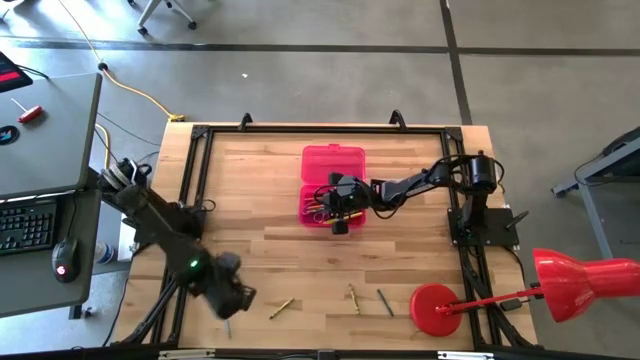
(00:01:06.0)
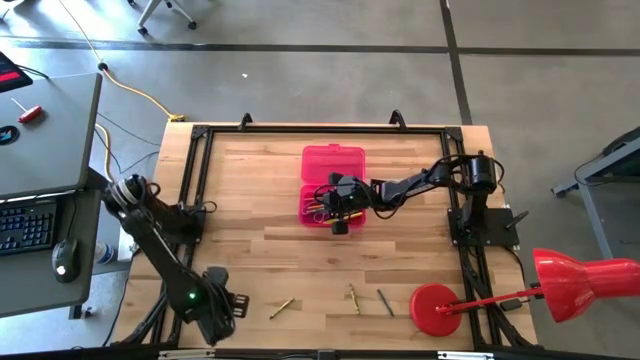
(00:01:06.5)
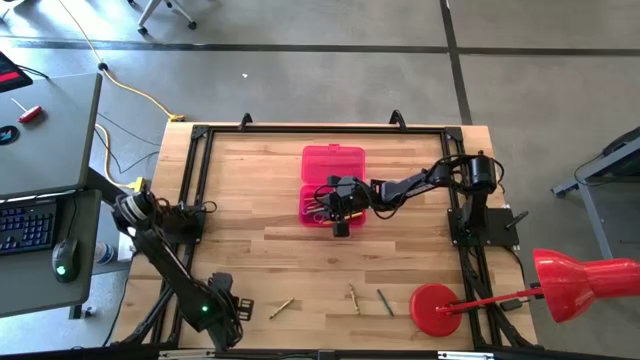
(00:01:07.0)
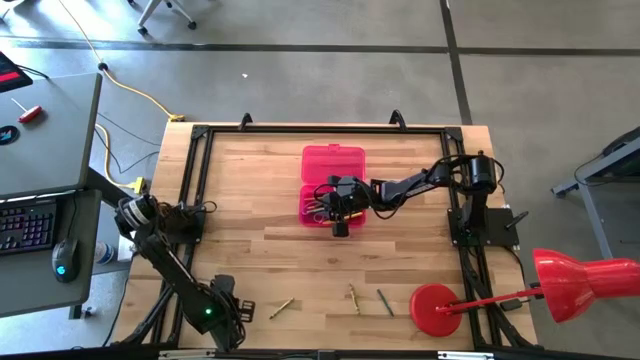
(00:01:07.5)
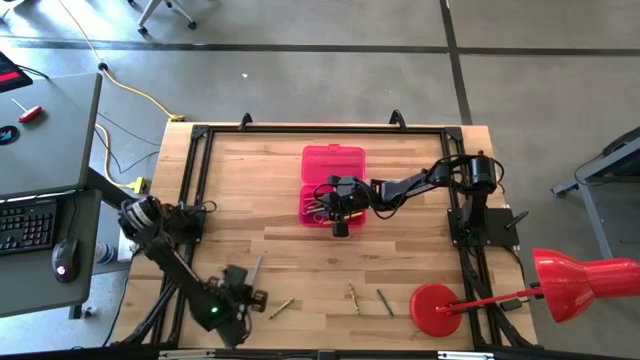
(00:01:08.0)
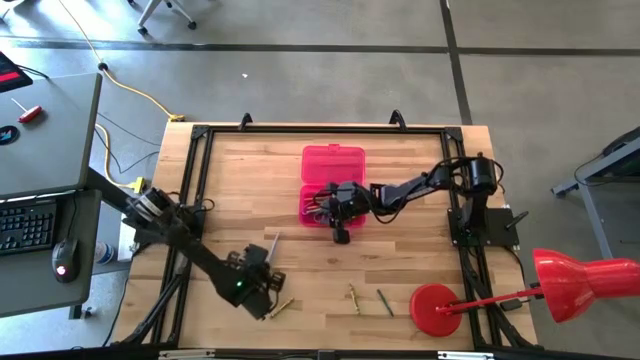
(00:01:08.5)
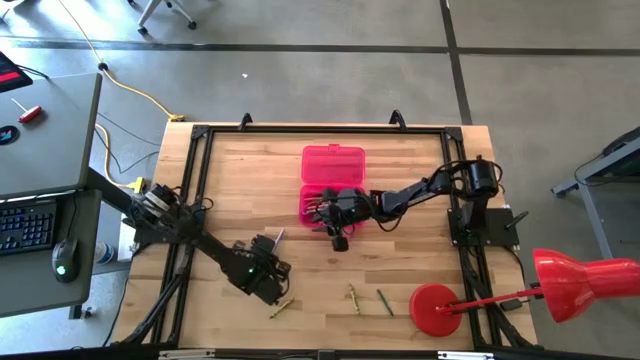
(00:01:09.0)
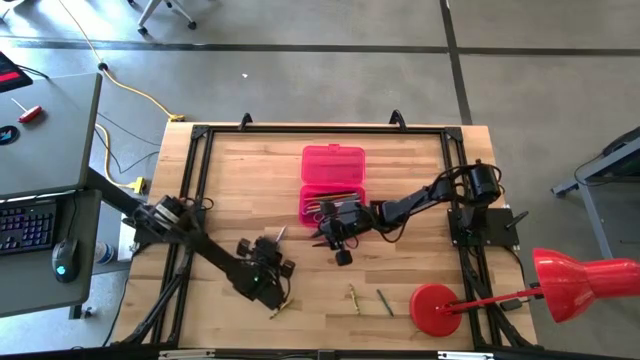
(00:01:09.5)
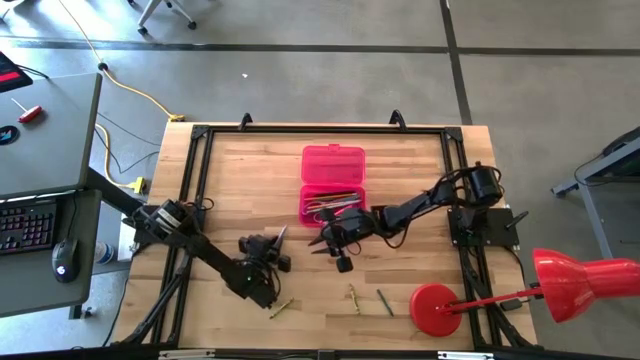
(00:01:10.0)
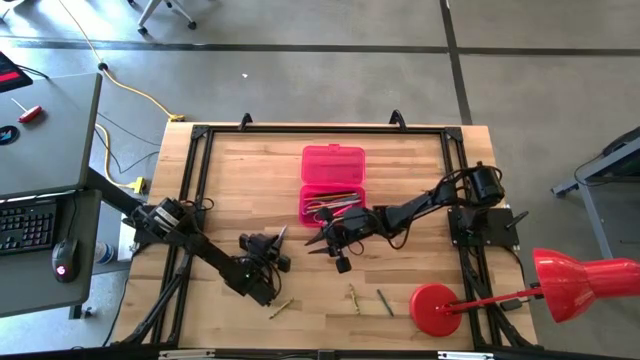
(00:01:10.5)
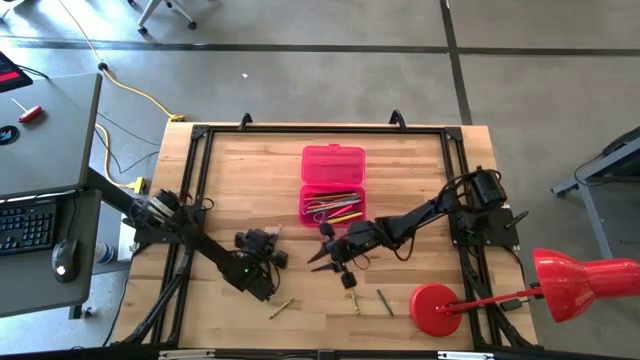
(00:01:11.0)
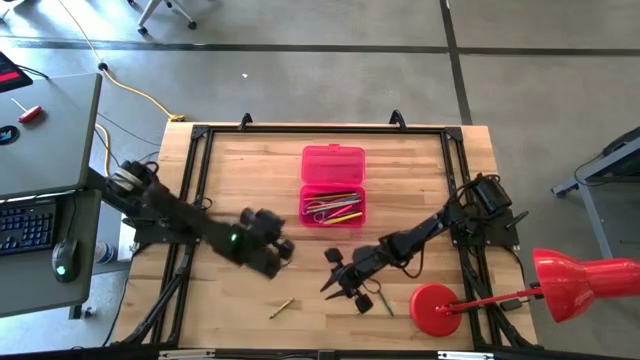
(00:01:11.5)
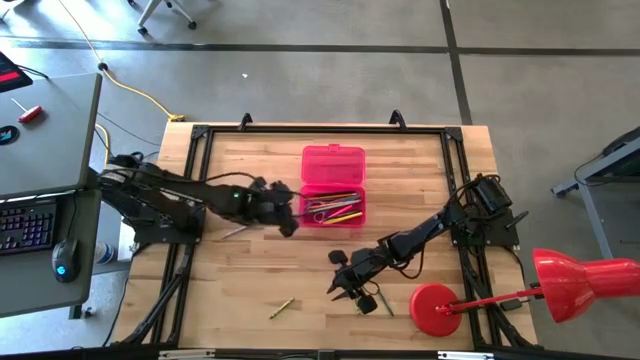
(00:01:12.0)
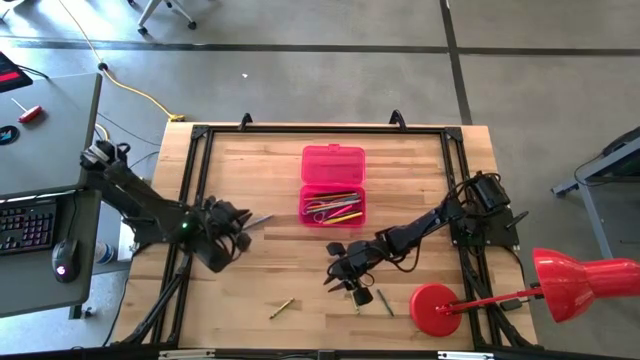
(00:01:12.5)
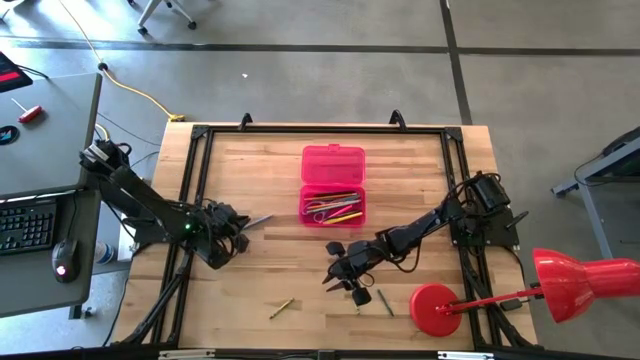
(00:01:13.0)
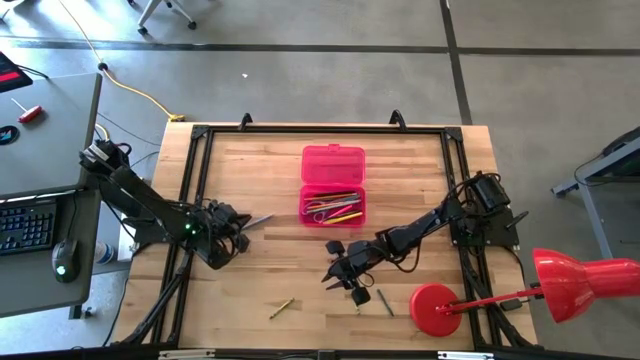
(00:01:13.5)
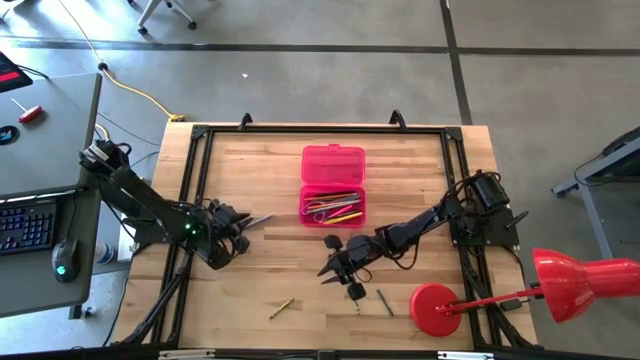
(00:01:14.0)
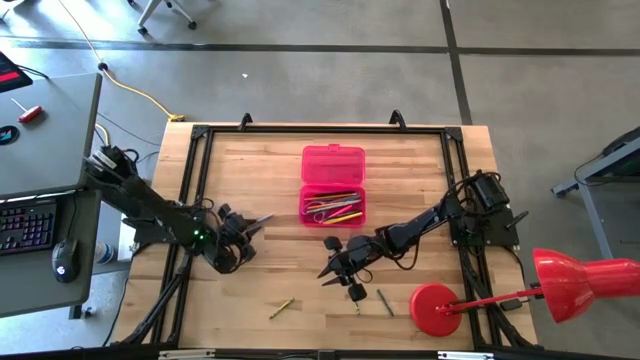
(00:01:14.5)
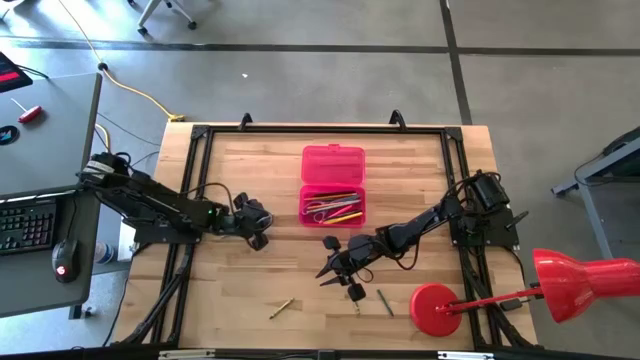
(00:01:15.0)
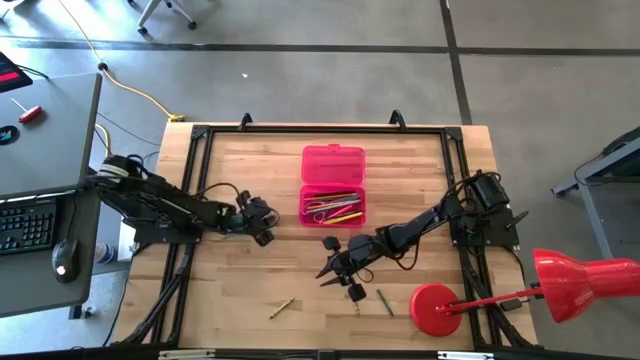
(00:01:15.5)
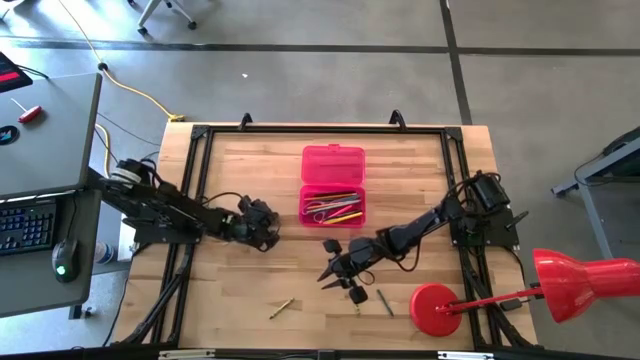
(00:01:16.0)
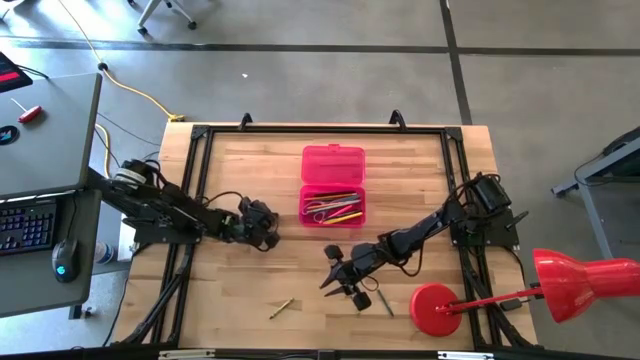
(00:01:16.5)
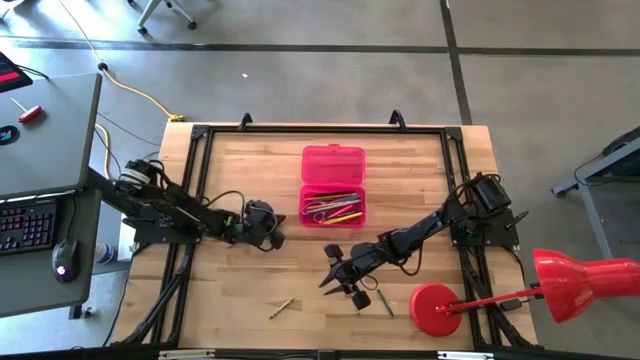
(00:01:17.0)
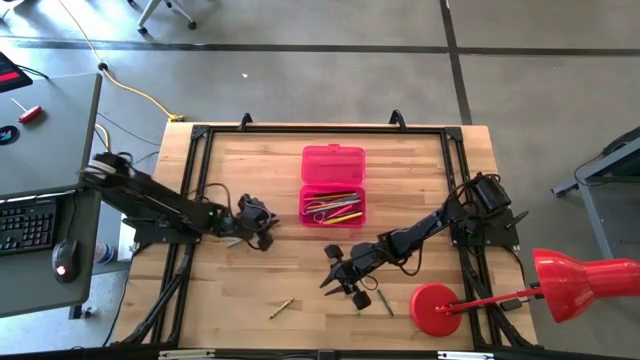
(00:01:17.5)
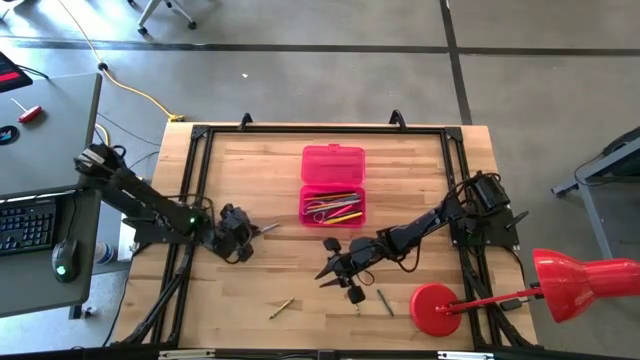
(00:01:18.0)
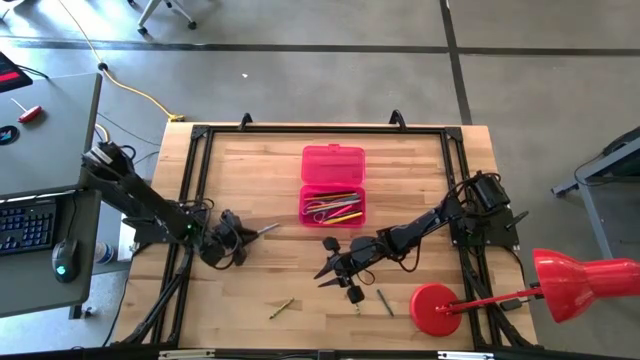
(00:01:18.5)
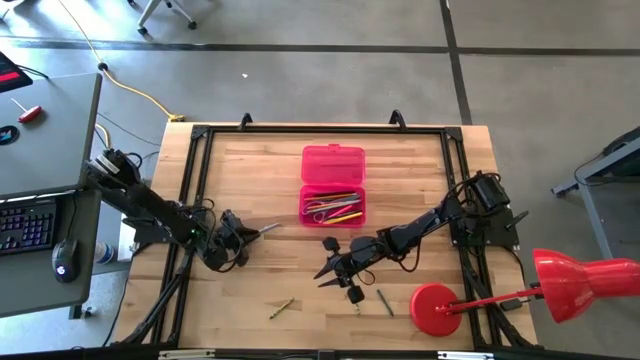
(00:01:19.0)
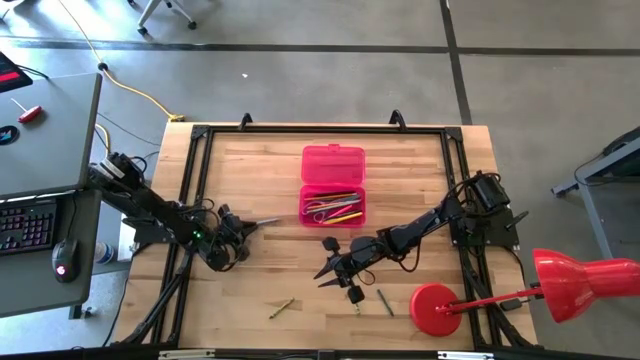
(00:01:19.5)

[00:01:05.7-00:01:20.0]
Task: Pick & place school supplies into a supply box
Put the blue pencil into the pink supply box

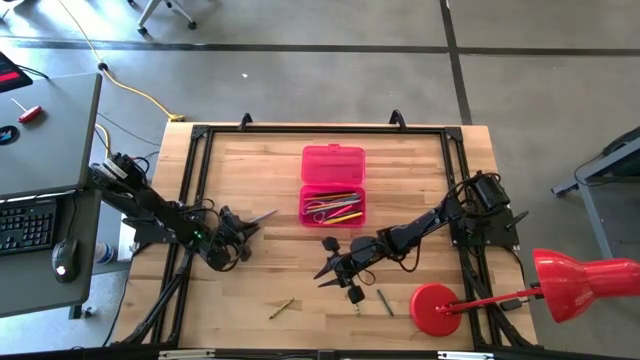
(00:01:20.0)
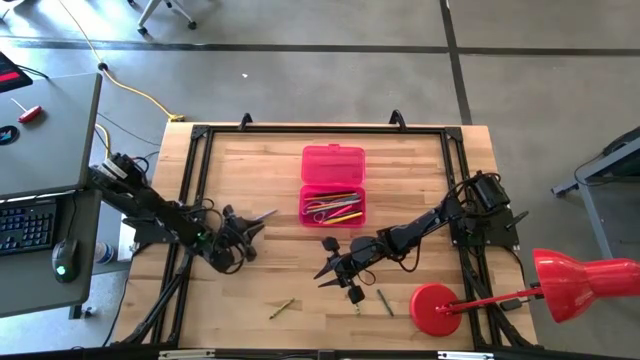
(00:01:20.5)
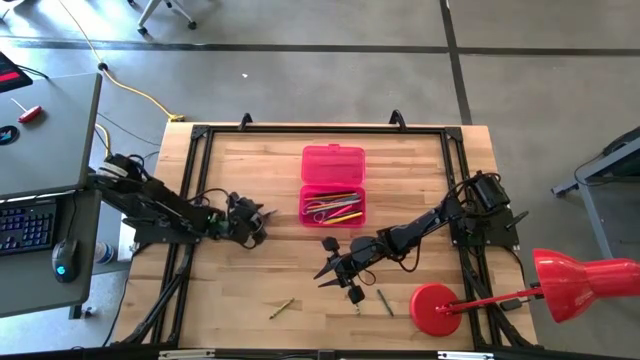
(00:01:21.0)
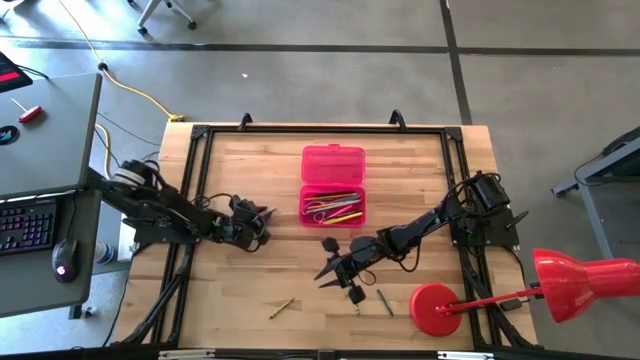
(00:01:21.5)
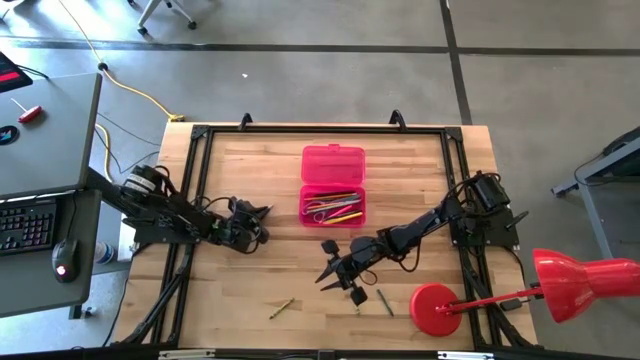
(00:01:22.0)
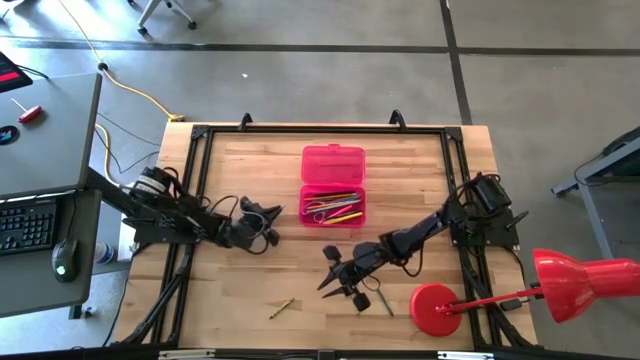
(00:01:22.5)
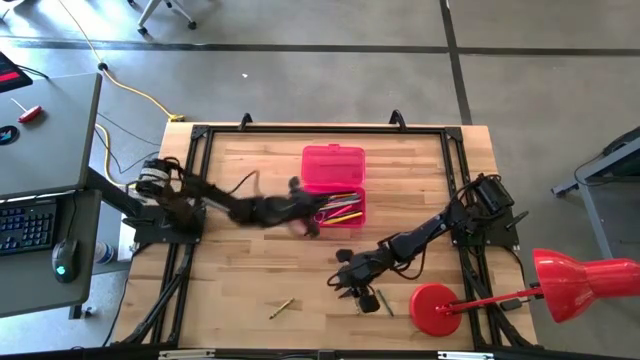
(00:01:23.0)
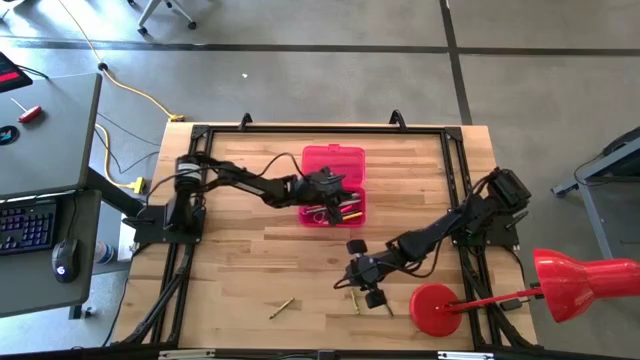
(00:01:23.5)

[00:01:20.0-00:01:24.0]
Put the blue pencil into the pink supply box

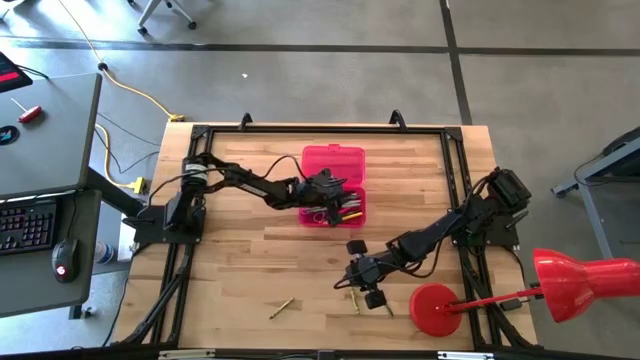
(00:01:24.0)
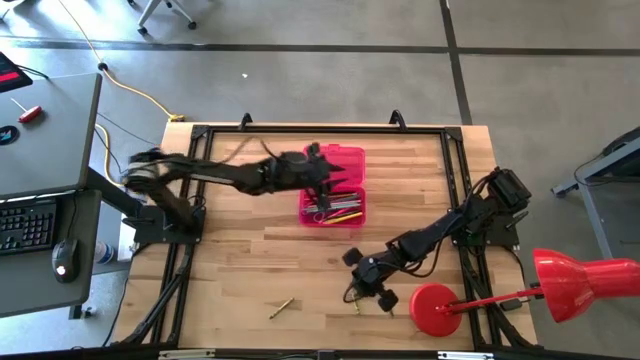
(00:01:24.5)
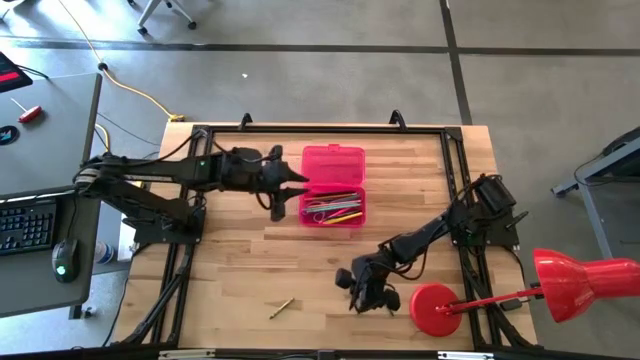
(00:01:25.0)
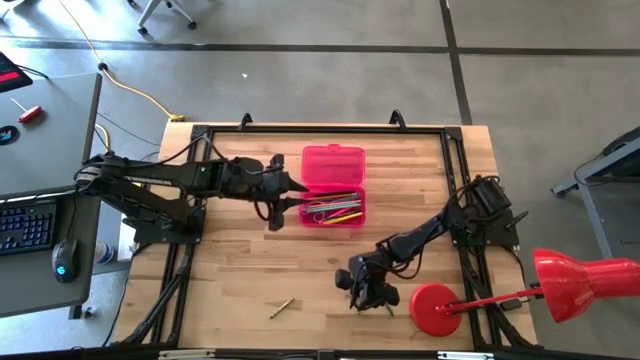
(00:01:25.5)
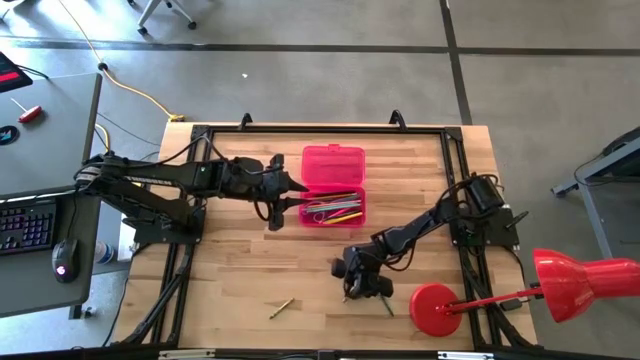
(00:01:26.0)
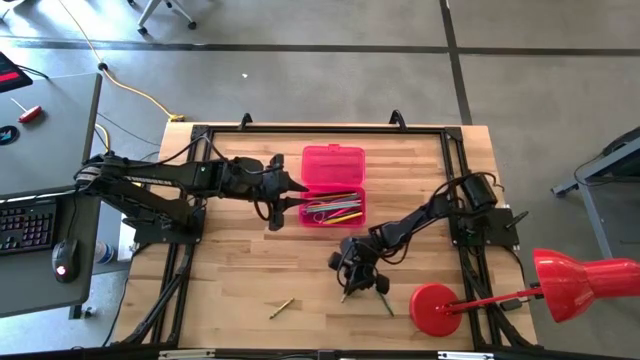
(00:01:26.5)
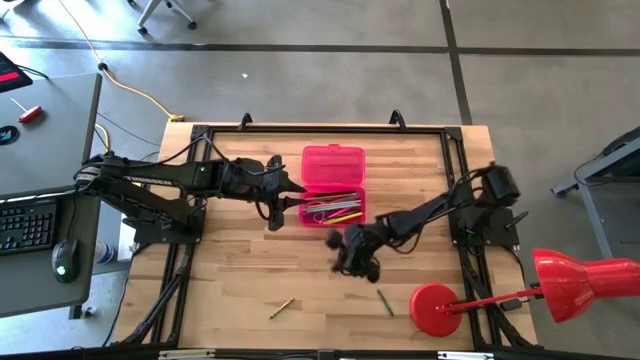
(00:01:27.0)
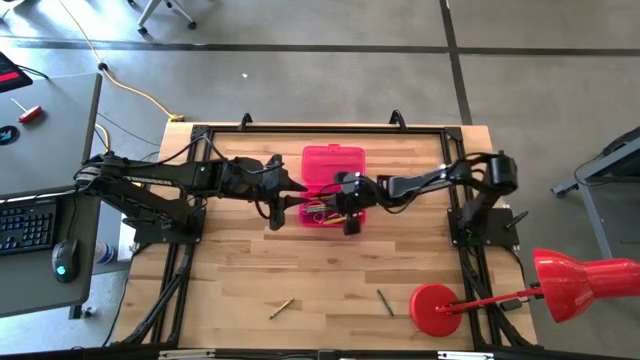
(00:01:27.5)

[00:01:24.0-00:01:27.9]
Put the right green crayon into the pink supply box
